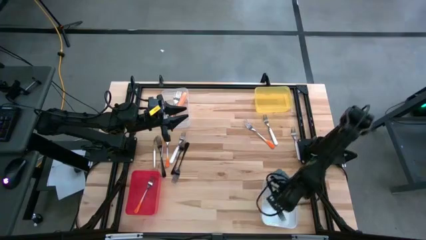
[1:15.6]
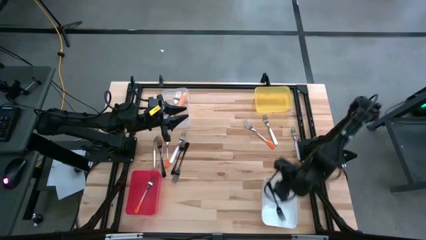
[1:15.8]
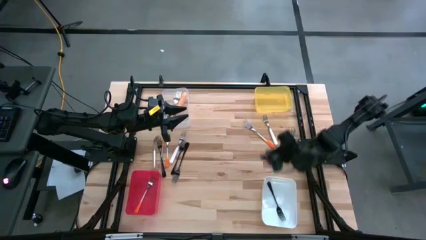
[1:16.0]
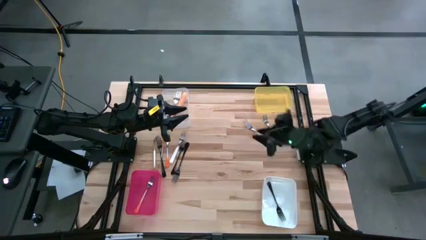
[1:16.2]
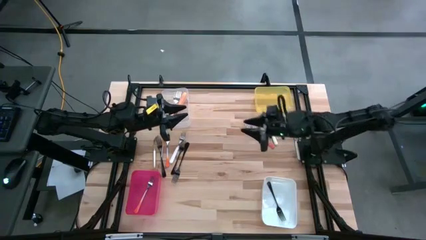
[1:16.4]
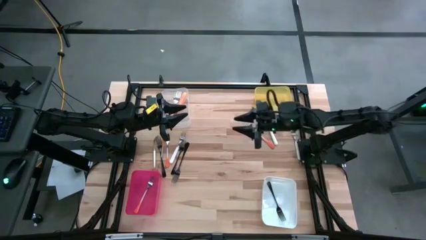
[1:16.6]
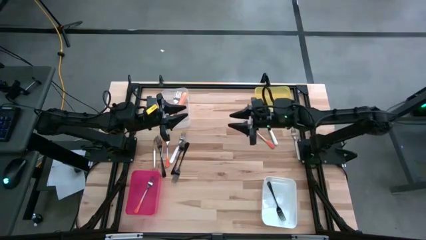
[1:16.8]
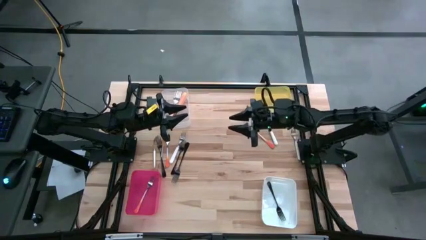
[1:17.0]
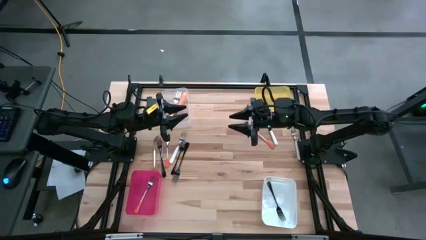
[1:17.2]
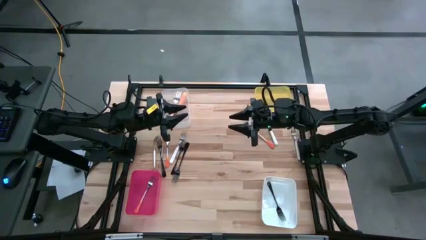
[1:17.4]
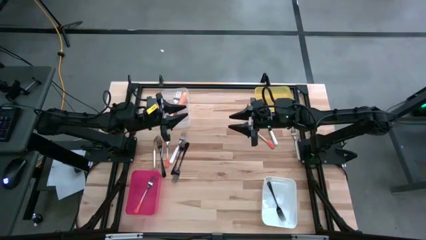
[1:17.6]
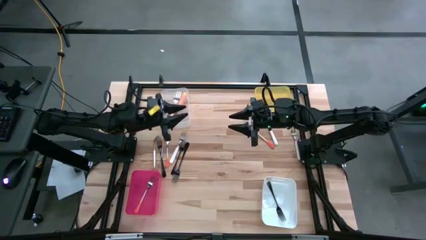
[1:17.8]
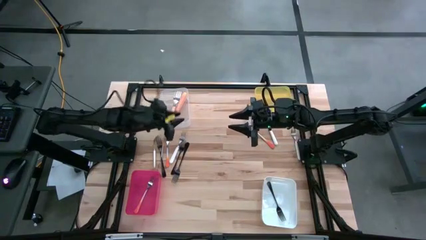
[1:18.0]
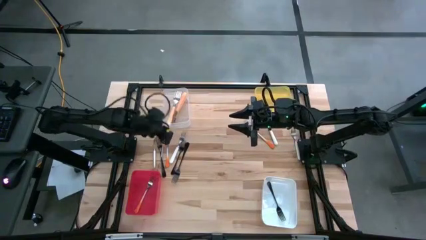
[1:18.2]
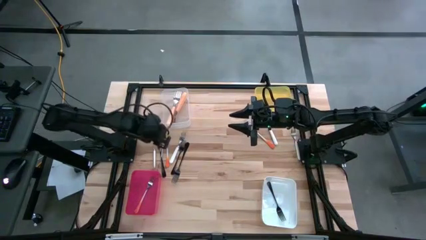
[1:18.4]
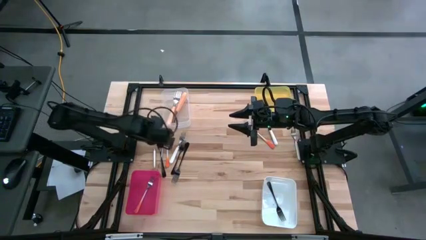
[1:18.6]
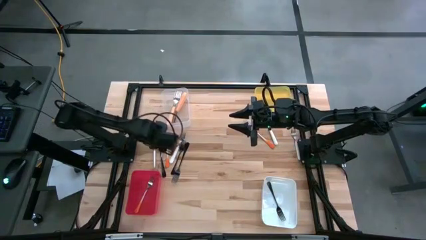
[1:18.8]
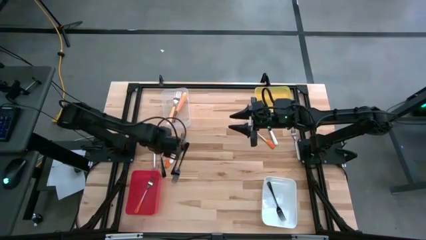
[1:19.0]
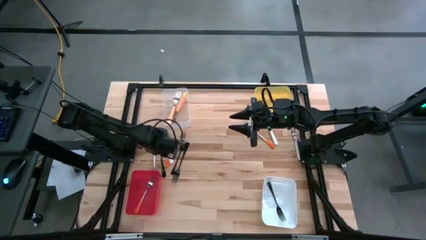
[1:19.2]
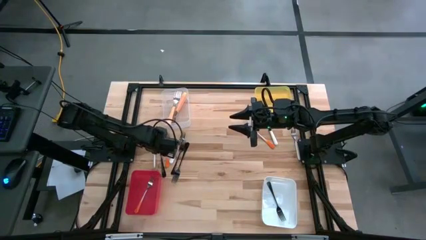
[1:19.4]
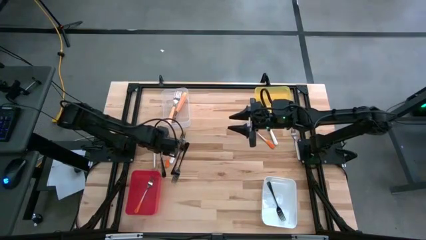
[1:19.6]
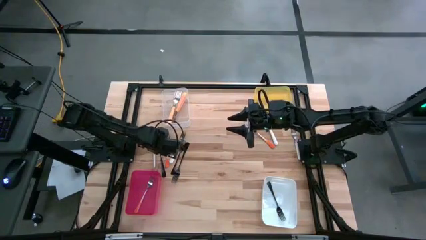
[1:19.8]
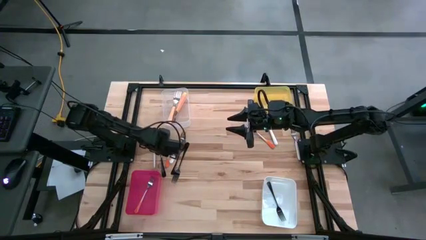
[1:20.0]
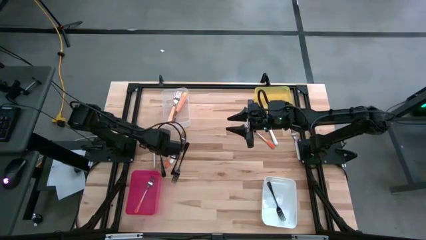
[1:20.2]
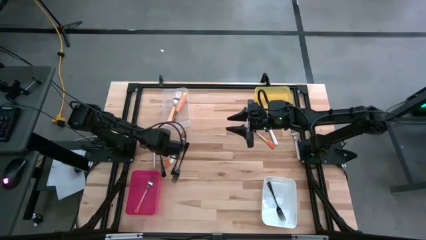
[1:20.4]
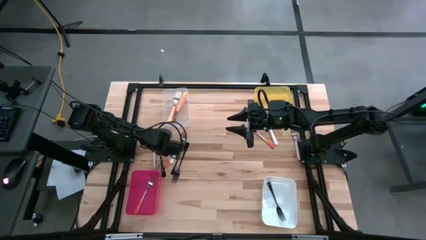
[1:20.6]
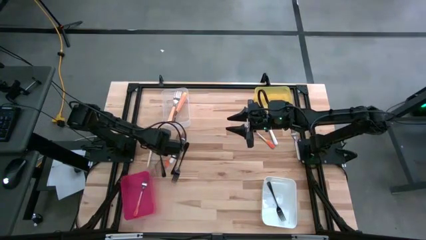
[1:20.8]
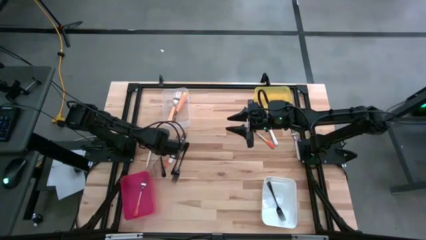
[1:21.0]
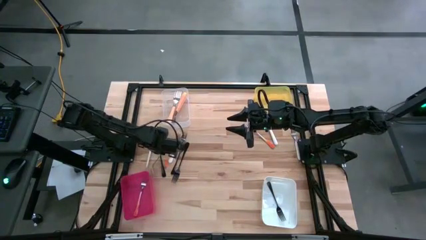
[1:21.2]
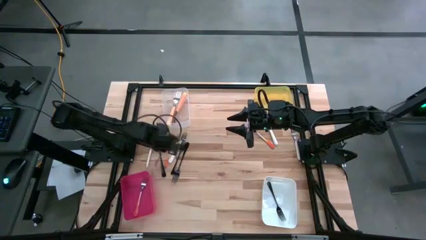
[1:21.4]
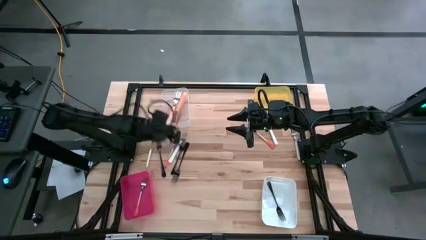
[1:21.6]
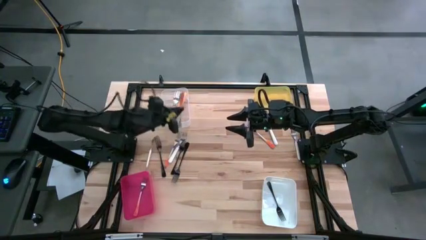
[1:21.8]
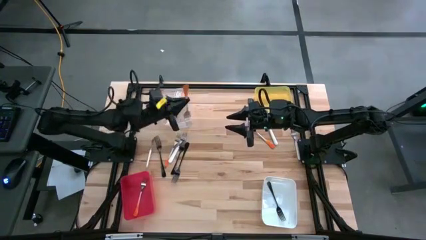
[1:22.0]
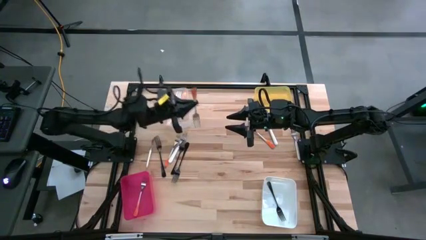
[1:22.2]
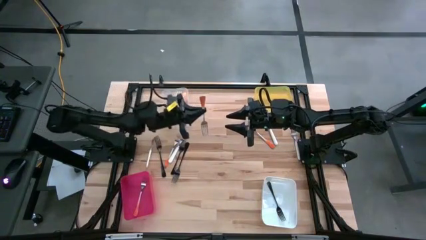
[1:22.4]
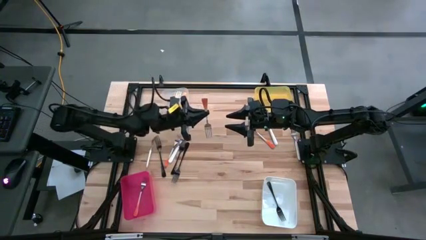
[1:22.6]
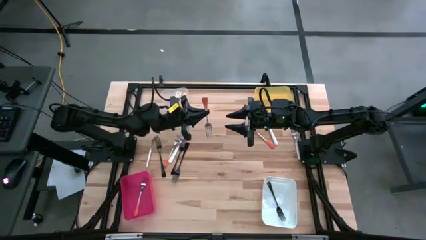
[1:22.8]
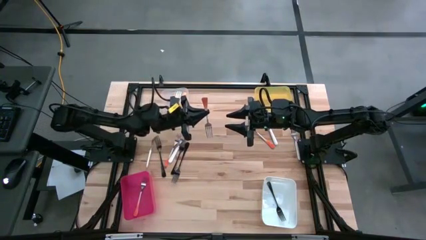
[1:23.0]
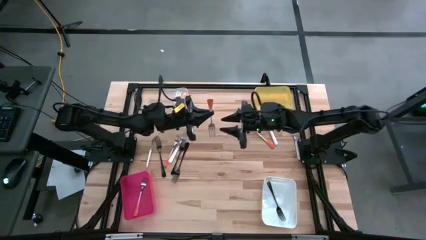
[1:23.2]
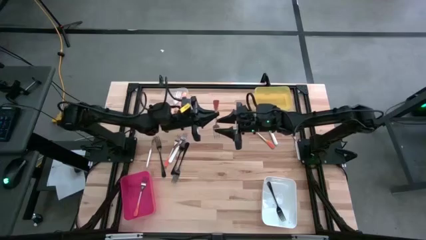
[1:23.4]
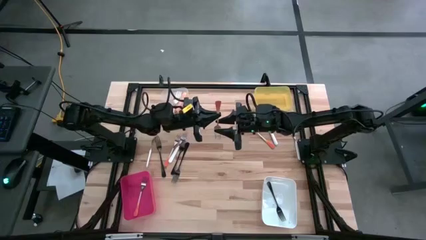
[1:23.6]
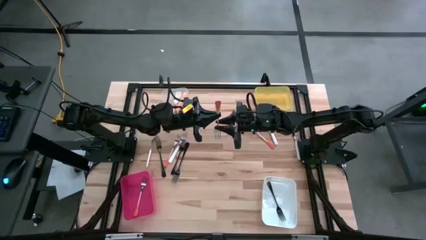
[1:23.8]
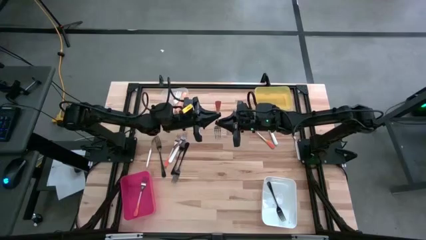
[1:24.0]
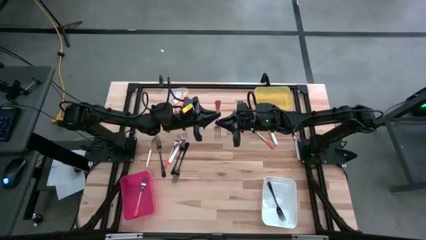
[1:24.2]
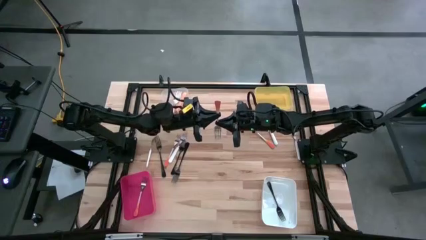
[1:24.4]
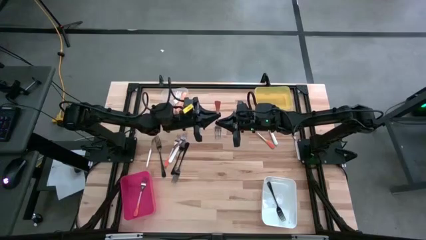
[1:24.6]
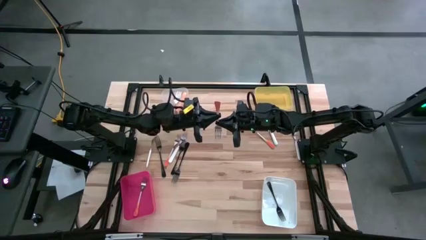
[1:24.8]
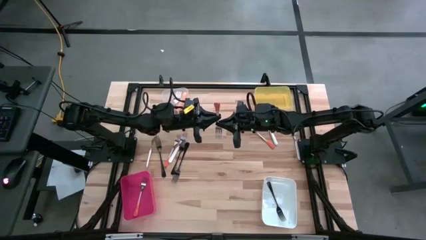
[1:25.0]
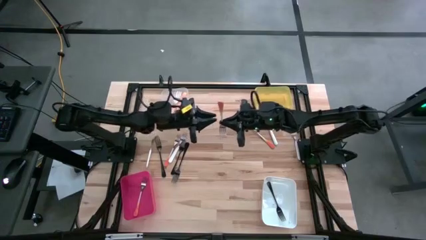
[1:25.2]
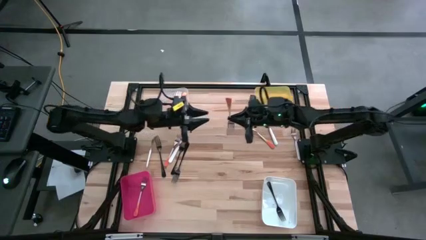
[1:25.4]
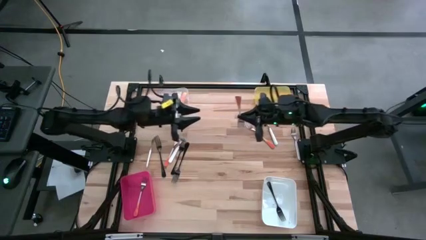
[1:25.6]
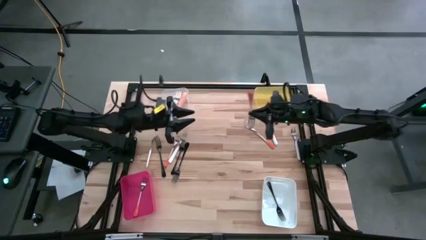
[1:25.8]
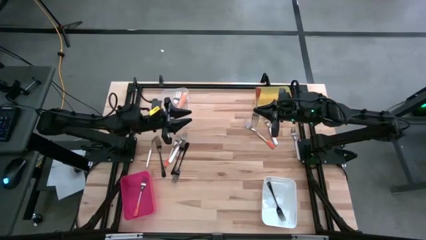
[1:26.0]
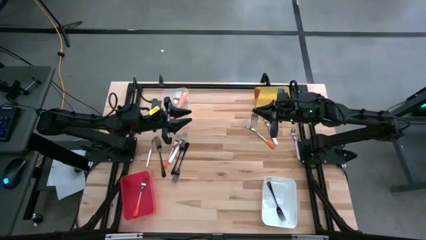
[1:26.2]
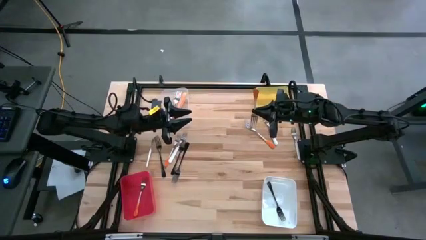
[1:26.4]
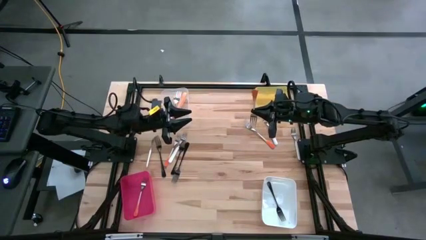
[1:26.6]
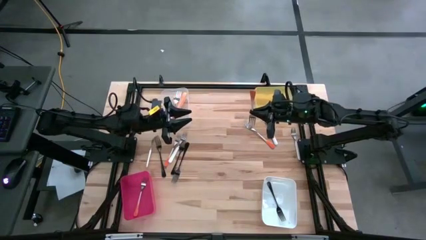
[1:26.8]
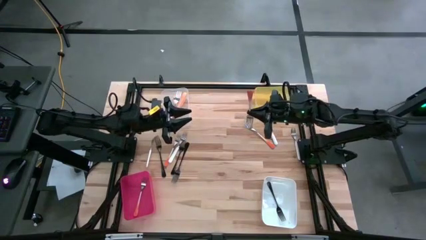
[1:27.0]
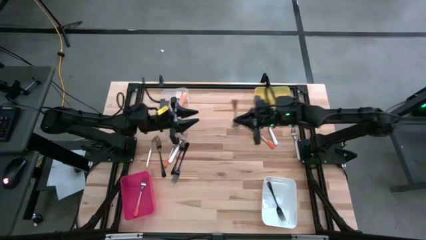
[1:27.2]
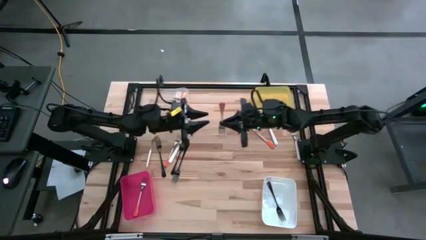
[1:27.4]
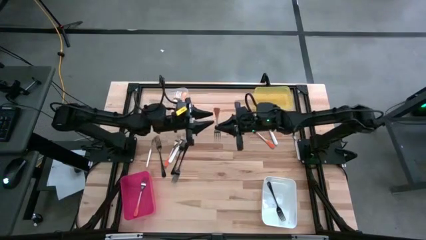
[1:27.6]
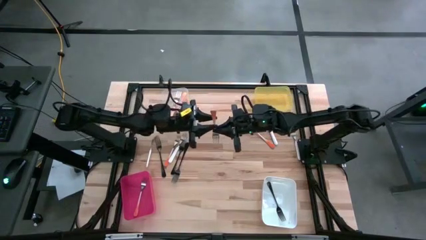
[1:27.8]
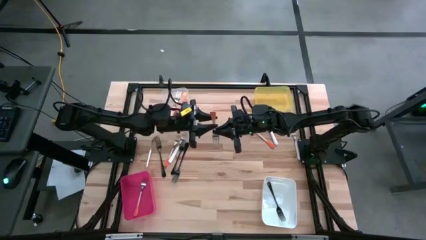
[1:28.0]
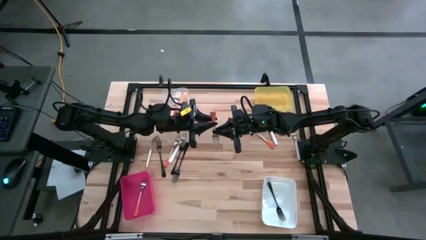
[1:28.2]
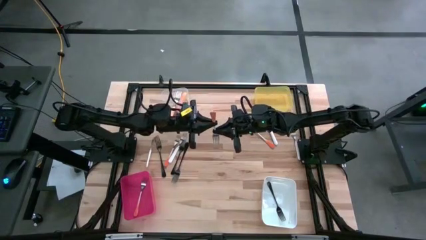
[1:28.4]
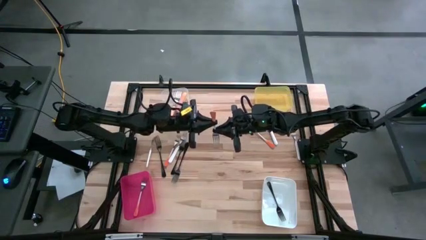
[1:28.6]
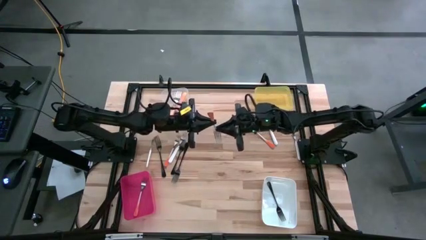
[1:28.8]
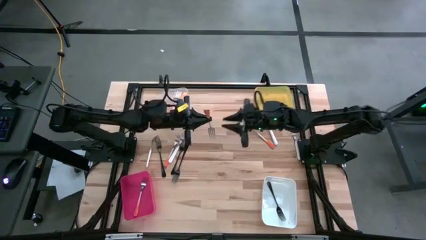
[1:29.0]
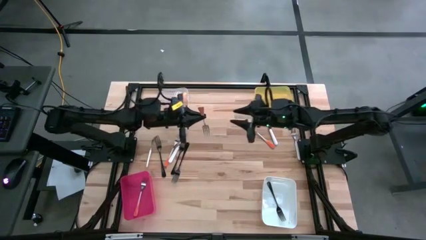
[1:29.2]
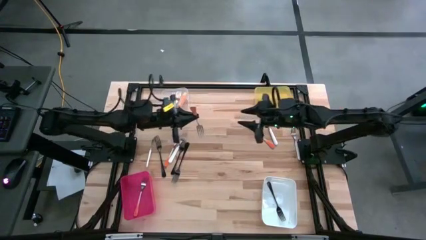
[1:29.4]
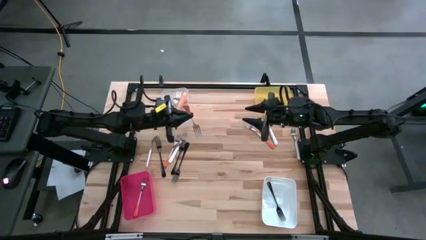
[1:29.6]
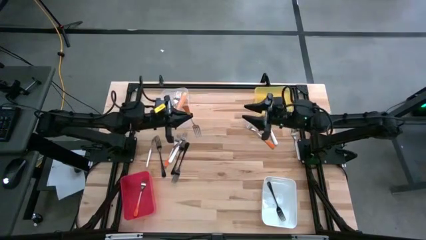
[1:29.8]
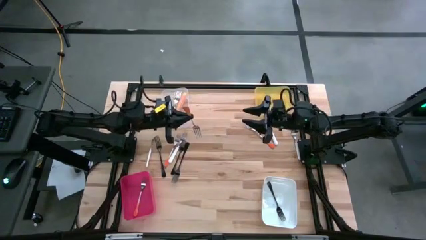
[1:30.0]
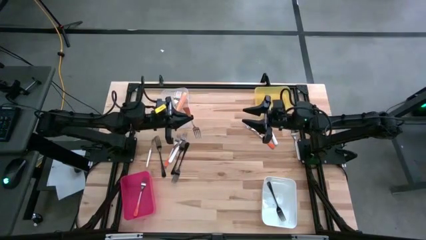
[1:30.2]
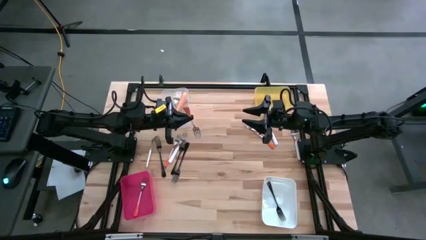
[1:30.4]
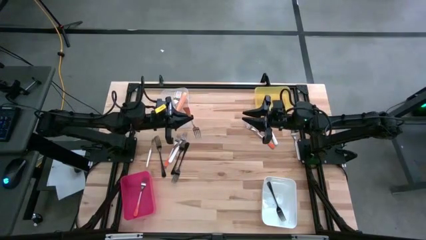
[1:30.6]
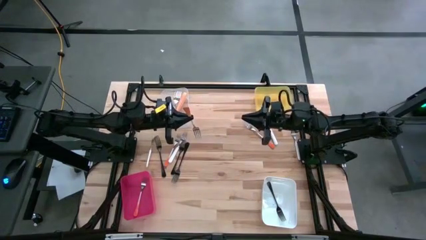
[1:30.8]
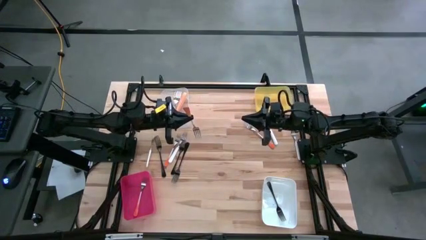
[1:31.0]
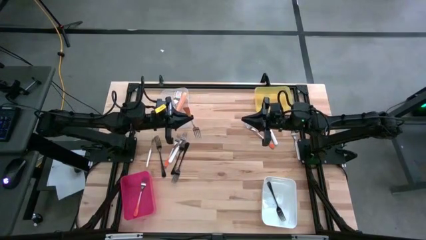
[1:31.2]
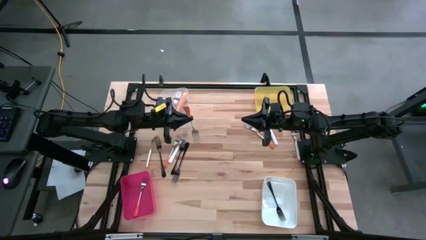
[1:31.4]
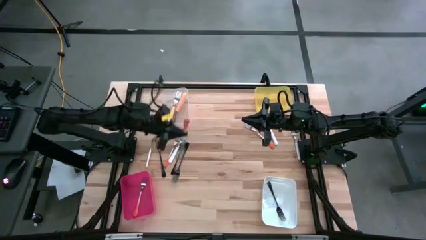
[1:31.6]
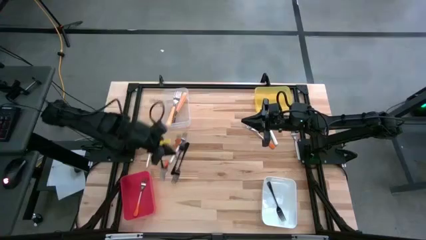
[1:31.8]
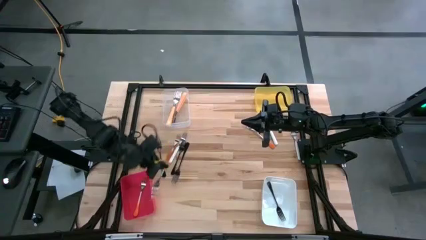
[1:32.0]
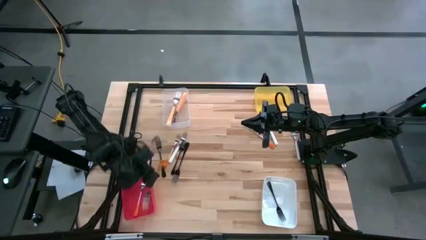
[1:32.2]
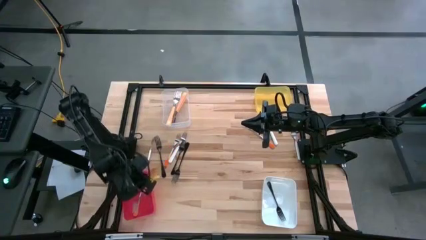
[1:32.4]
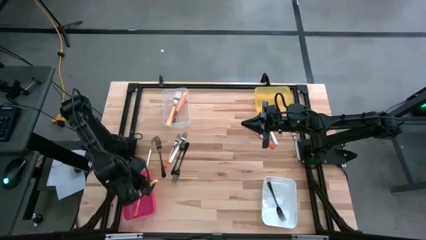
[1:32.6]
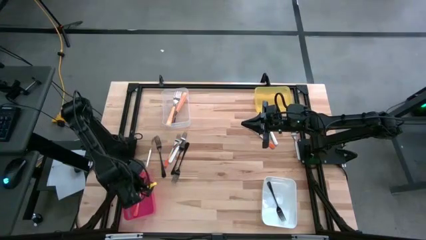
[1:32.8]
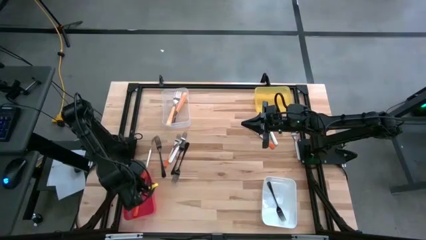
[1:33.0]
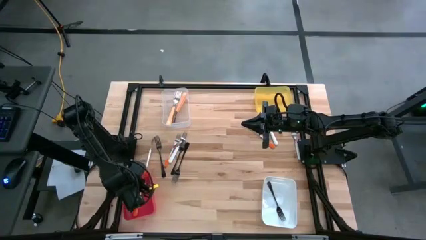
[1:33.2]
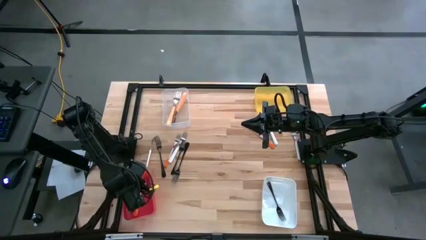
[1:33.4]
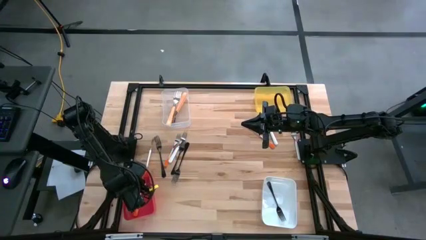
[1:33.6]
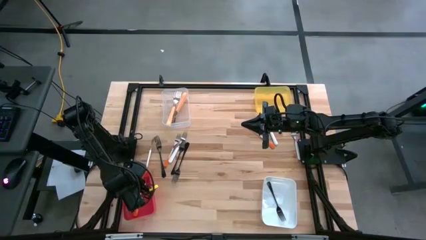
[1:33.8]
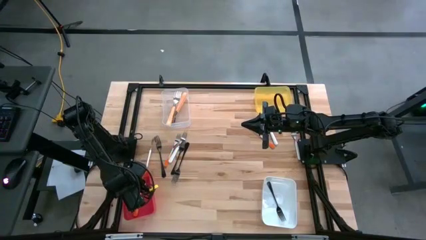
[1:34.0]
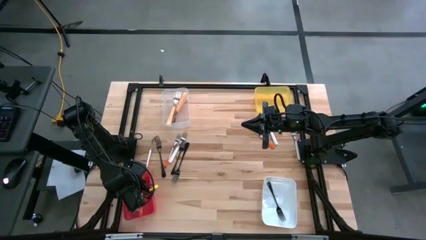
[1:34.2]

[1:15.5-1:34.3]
Task: Sort silverware by color (type)
Put the orange-white fork into the red bin
